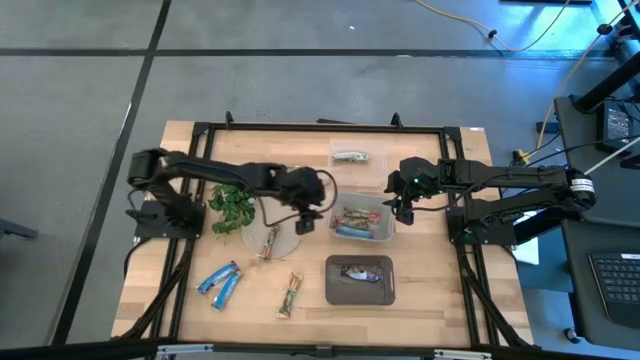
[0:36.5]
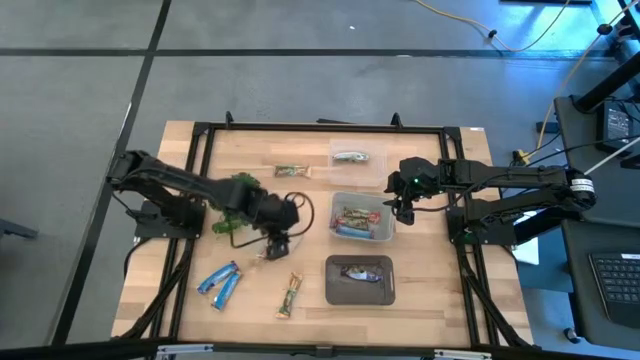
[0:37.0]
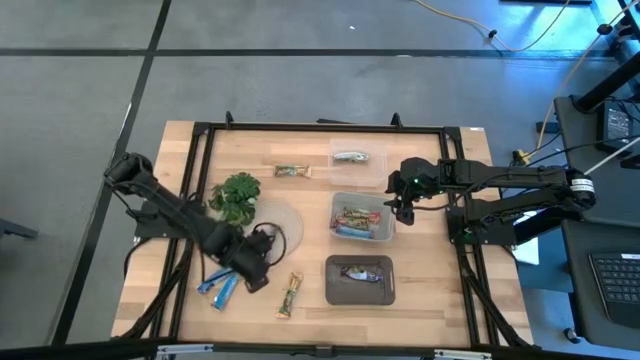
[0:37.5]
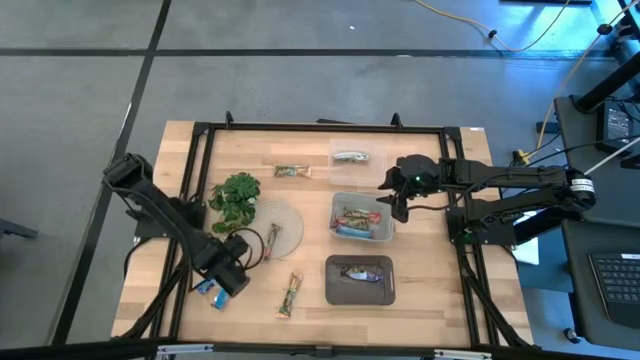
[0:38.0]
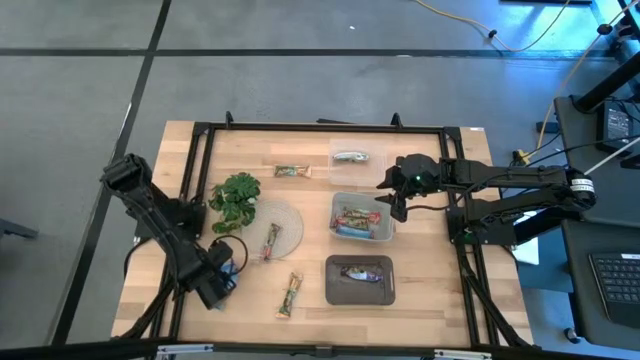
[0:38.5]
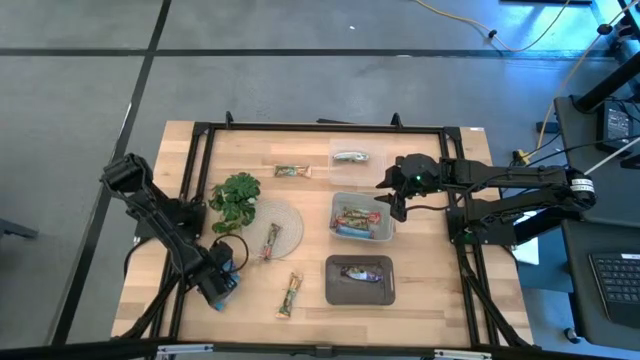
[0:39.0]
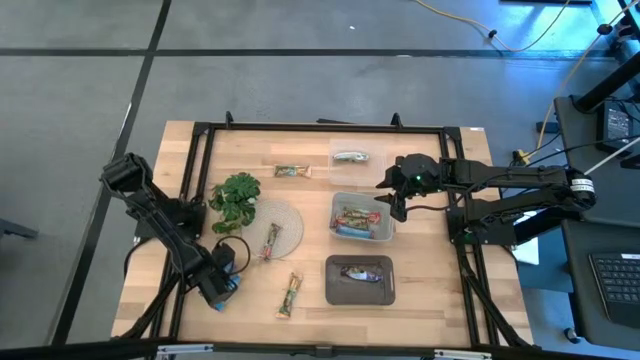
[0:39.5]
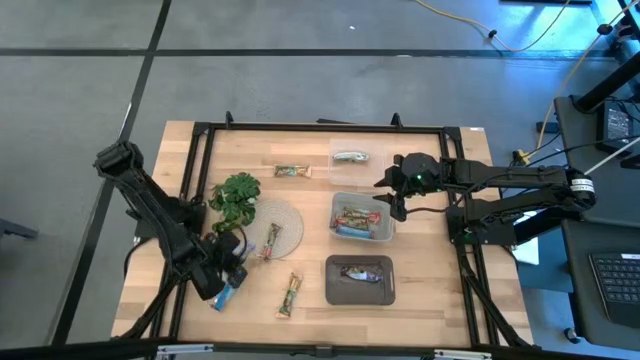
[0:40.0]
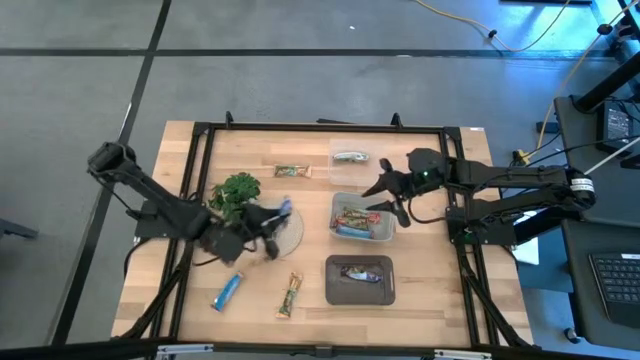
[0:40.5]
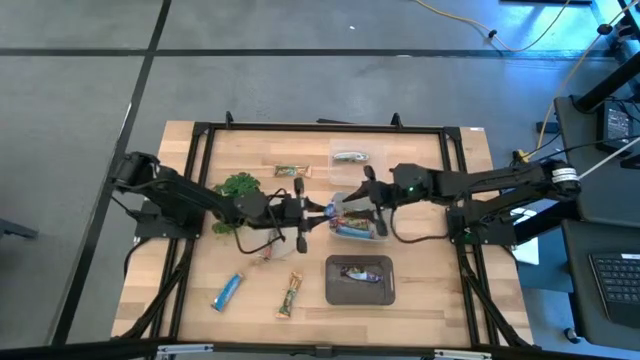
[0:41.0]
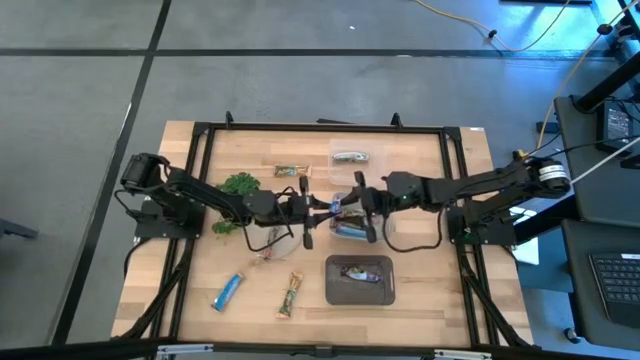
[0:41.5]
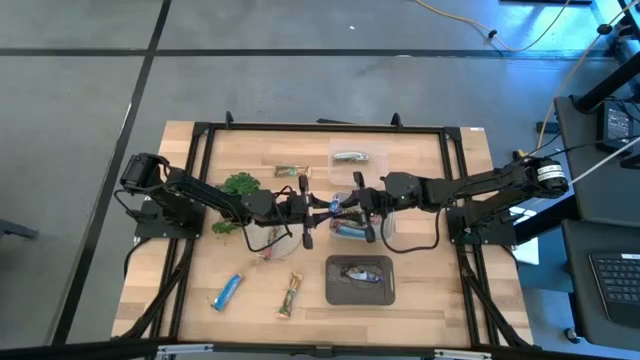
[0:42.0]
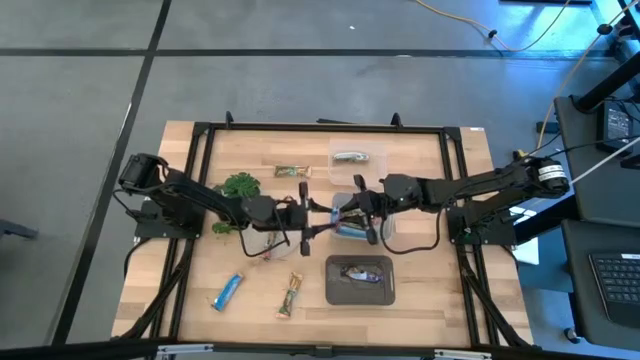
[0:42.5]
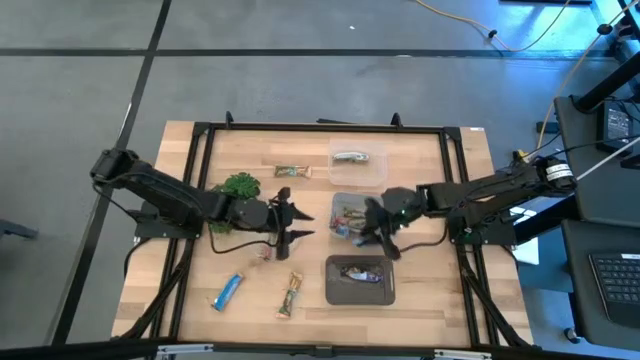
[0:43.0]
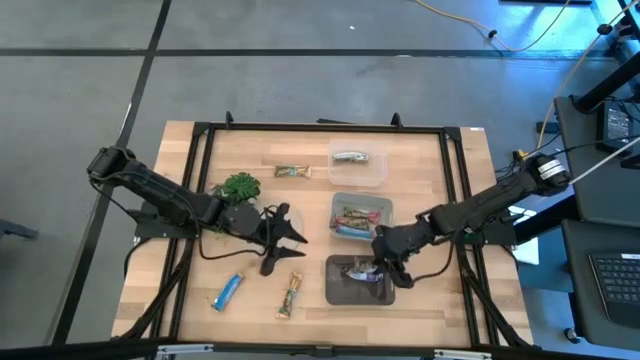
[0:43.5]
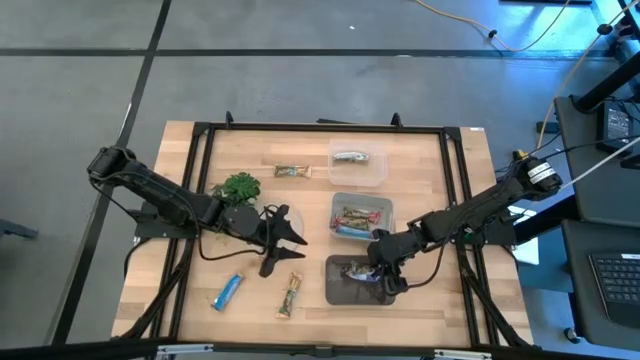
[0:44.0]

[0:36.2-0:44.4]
Task: Pick and place Granola Bars by type
Put the blue granola bar into the black bin

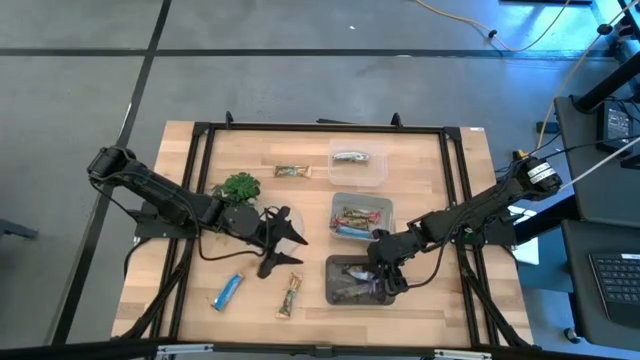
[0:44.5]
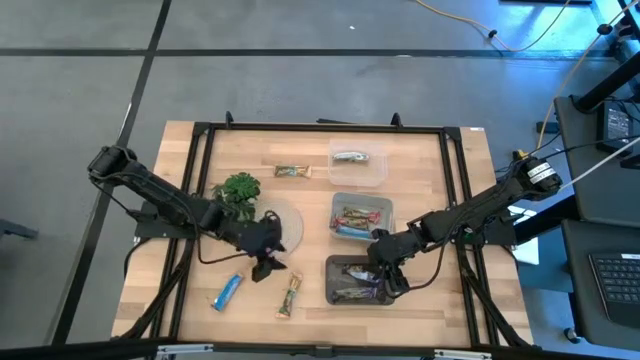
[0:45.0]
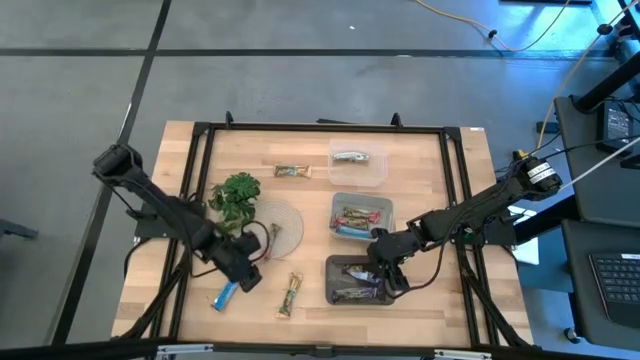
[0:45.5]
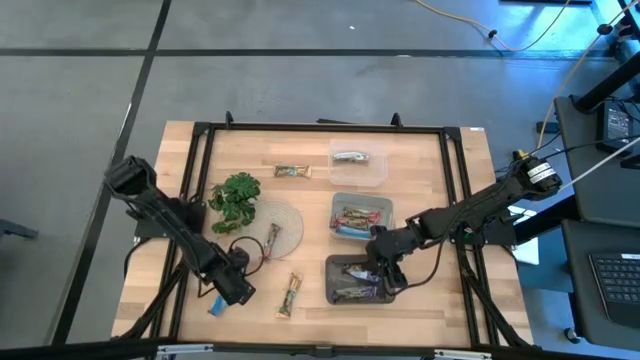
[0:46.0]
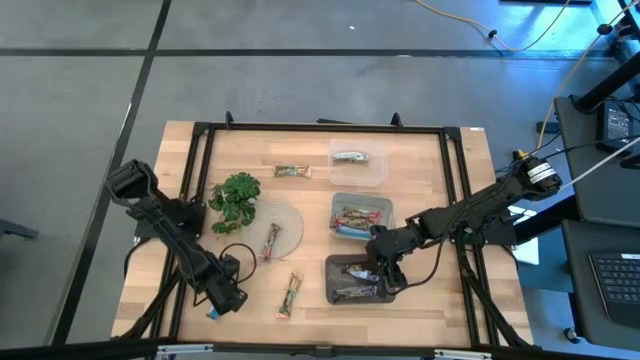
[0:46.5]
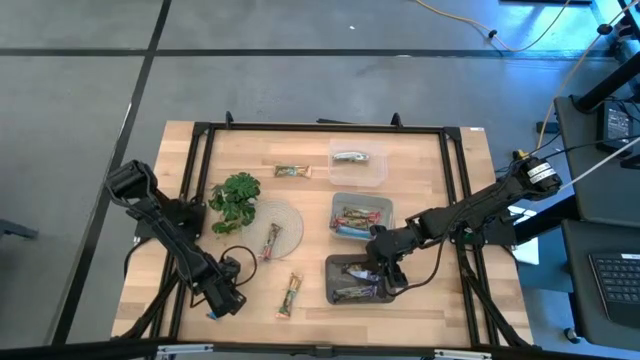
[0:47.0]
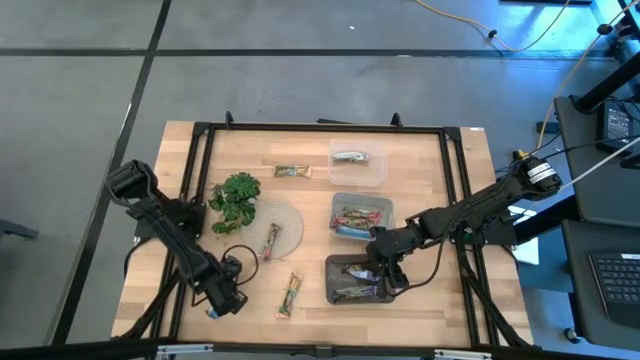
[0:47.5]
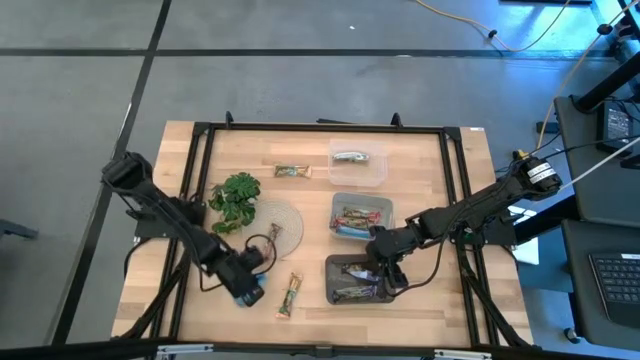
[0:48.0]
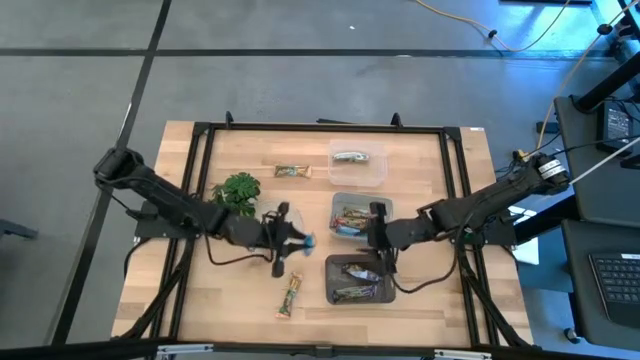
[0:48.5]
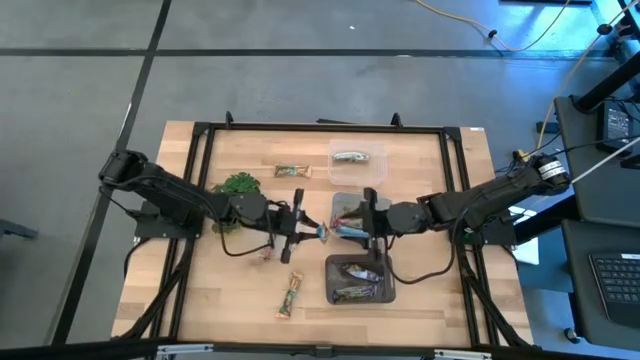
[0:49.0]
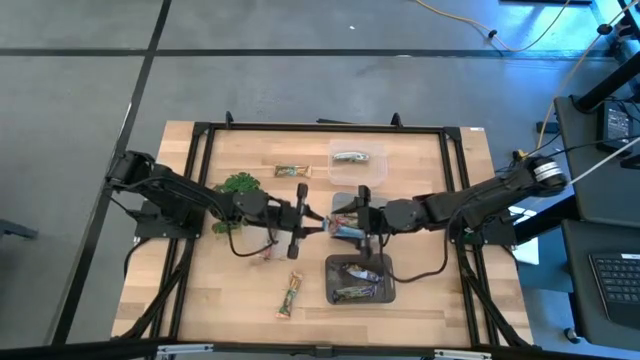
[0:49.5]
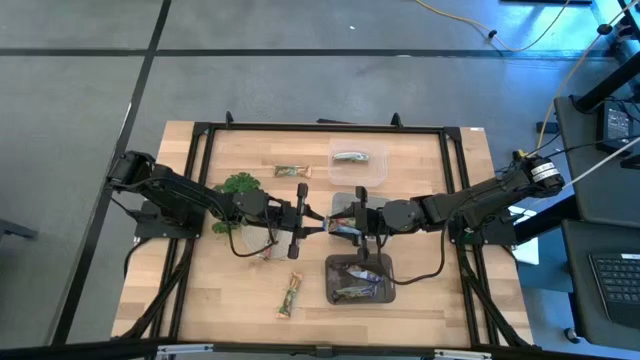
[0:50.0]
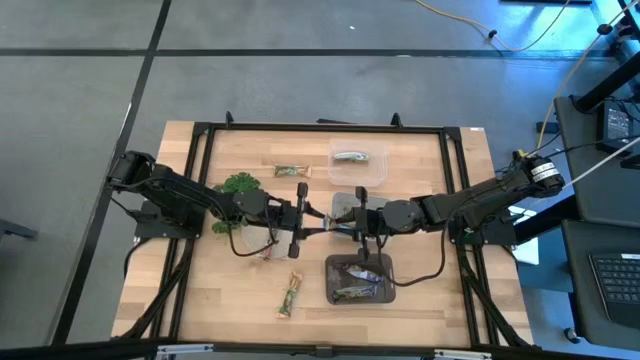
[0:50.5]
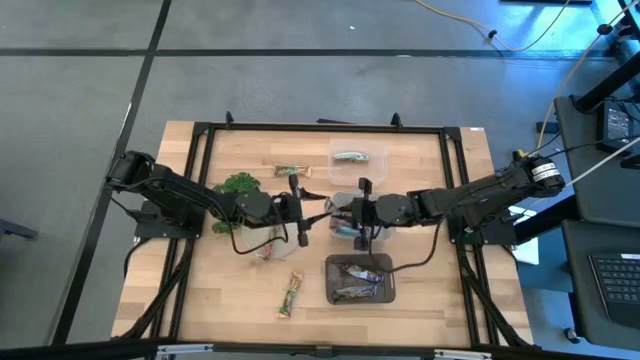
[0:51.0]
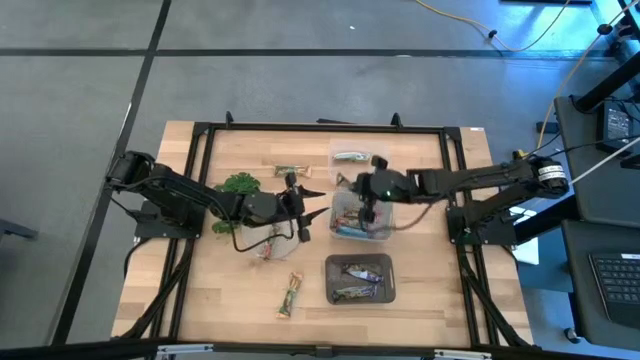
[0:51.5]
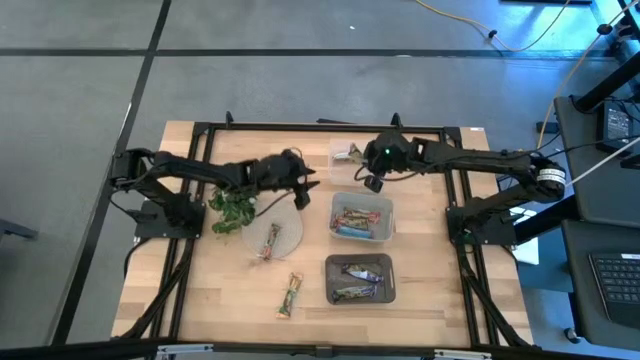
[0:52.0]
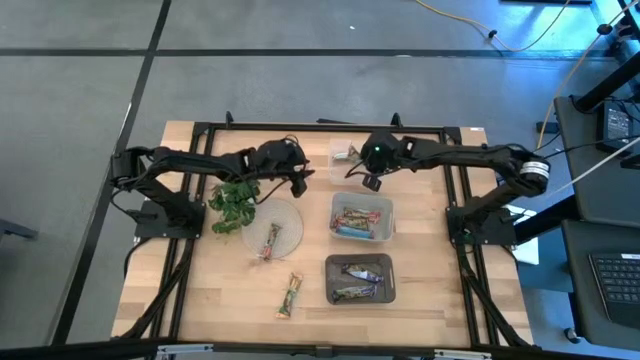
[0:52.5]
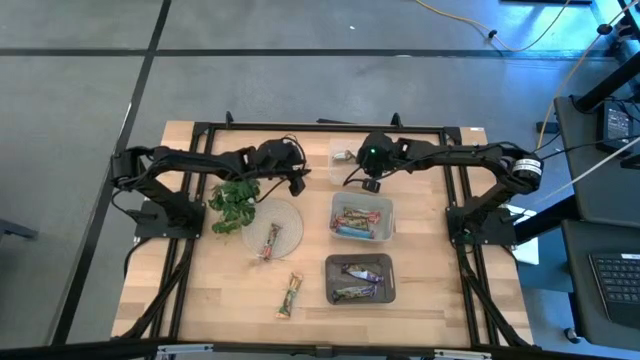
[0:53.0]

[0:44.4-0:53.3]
Put the yellow granola bar into the transparent bin

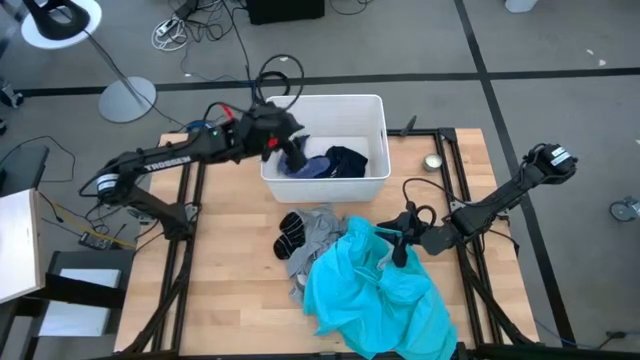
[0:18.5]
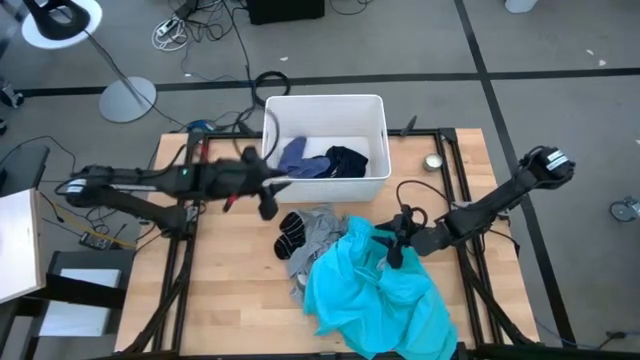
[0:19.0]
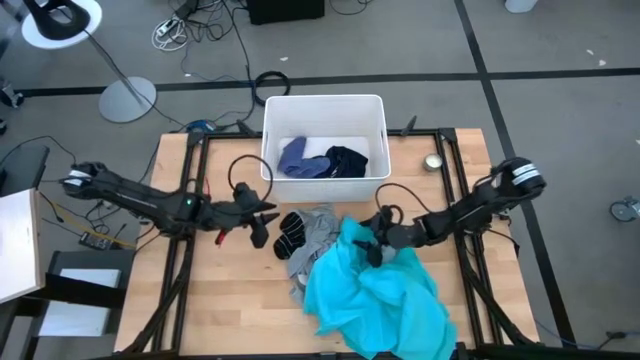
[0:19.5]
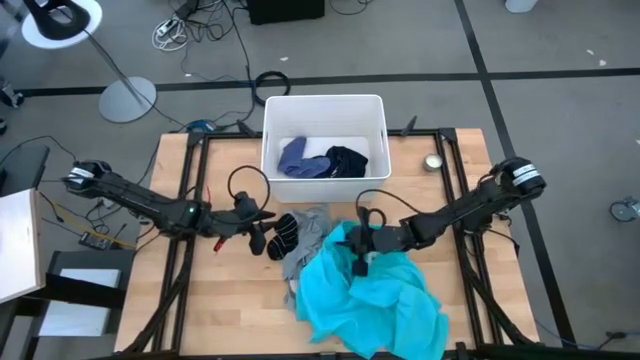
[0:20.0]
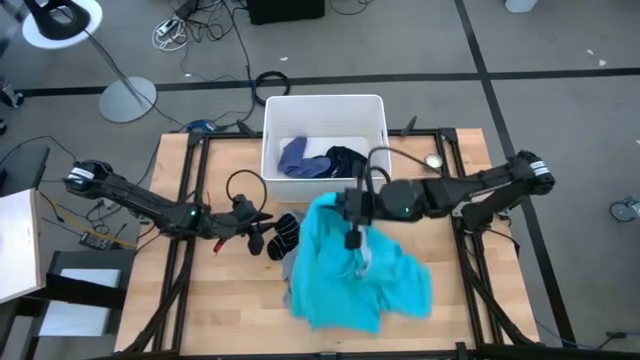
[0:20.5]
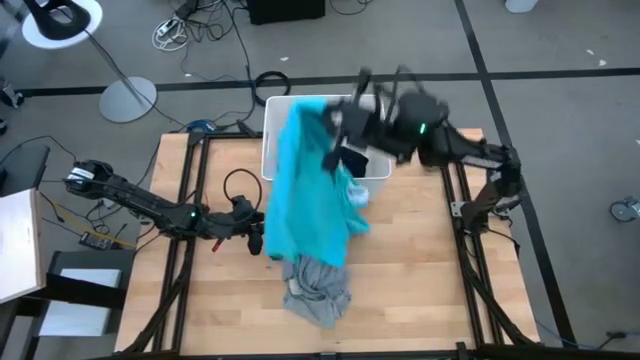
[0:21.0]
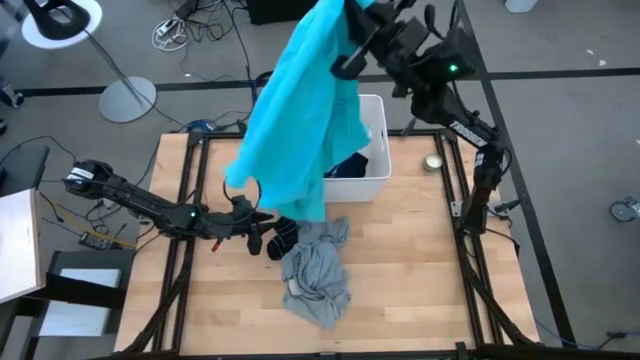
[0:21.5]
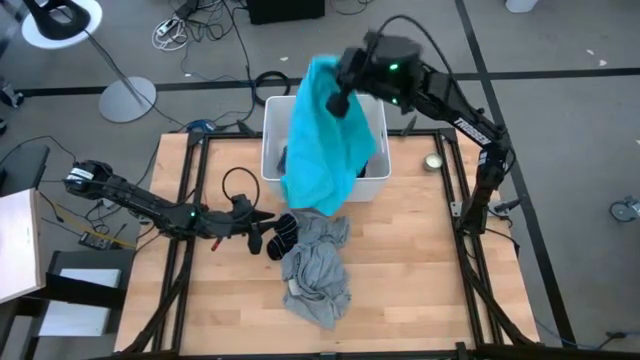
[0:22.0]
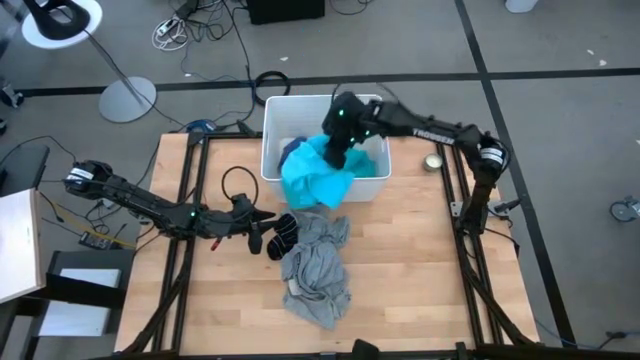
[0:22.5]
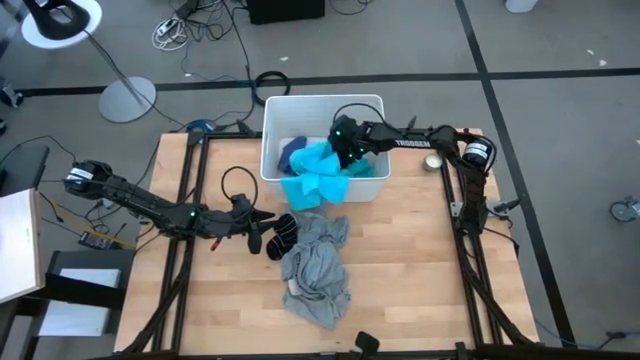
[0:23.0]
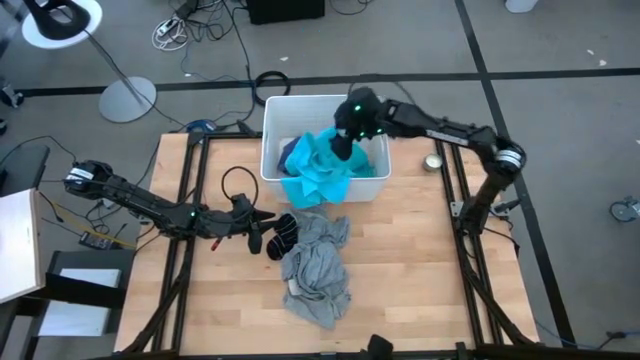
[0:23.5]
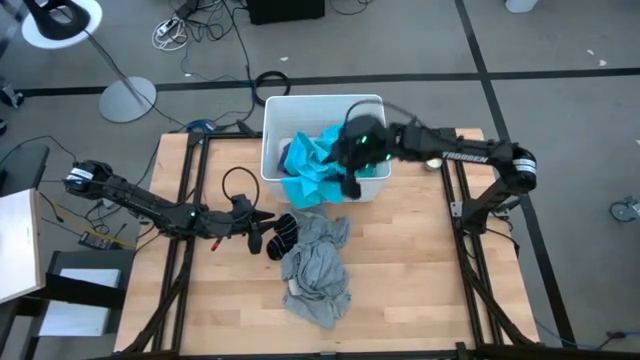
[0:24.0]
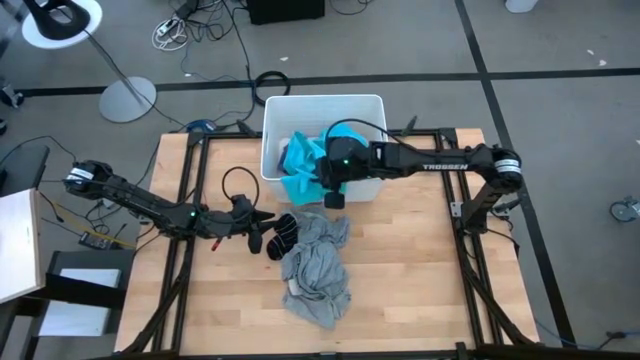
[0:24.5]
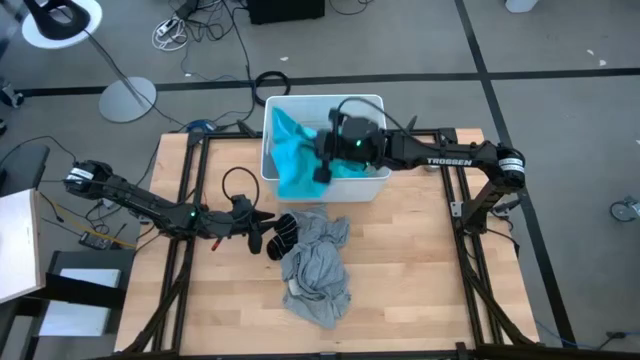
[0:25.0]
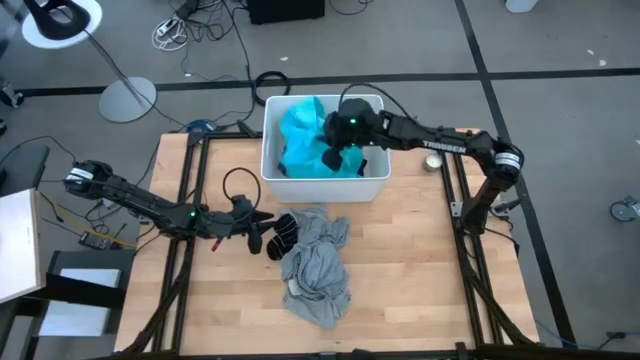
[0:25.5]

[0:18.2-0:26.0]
Task: Sort clothes
Put the blue short into the white bin
